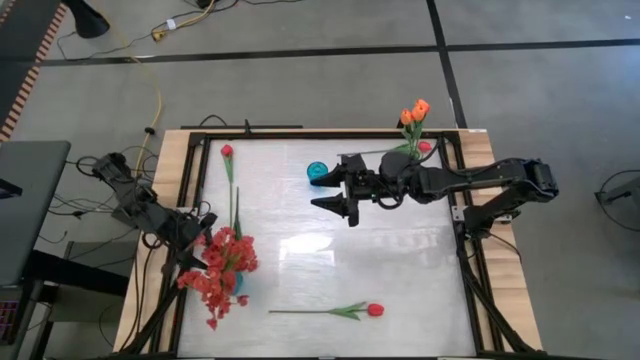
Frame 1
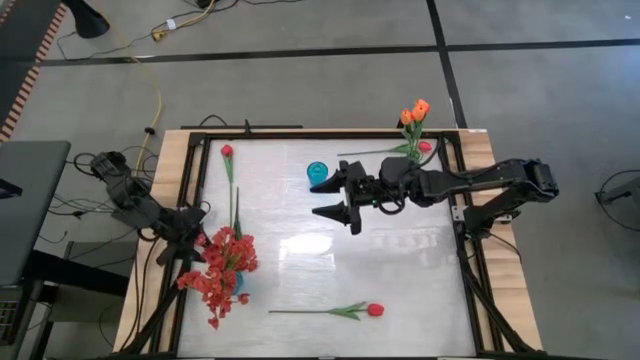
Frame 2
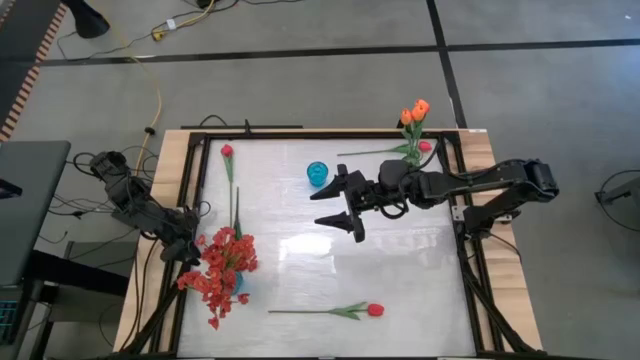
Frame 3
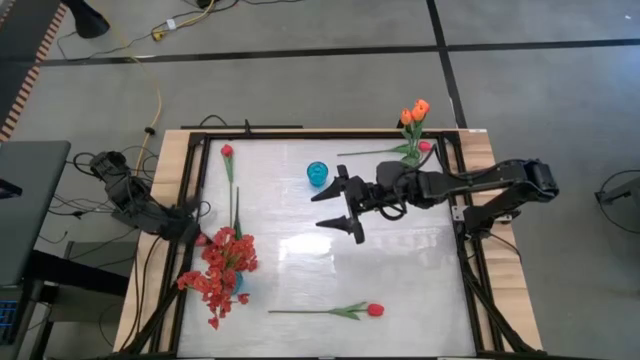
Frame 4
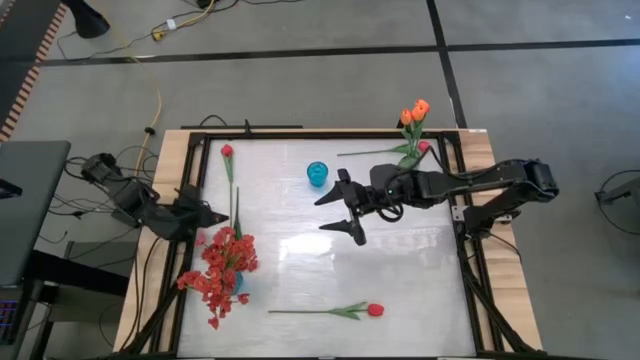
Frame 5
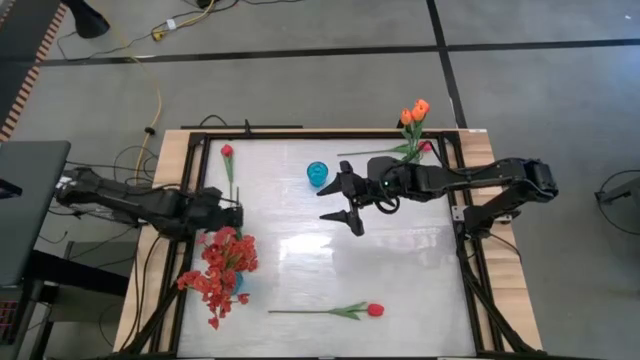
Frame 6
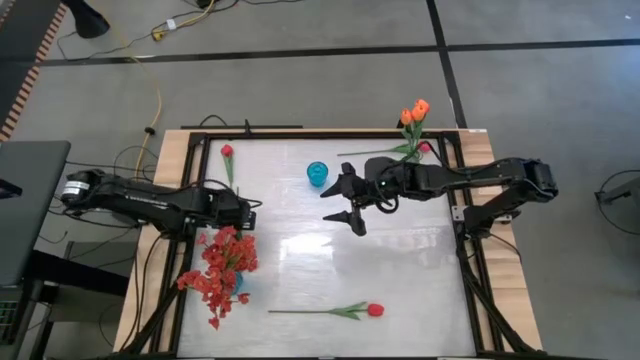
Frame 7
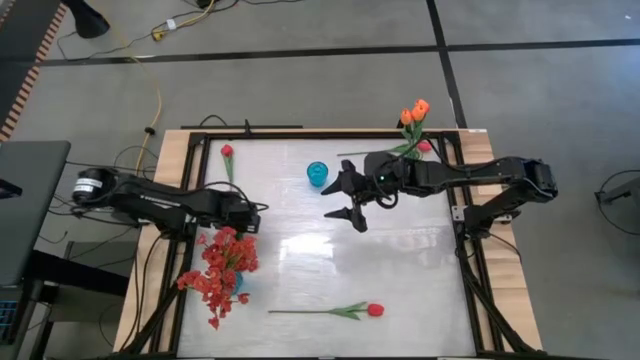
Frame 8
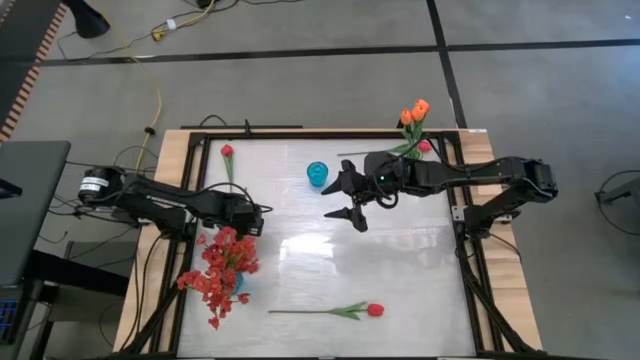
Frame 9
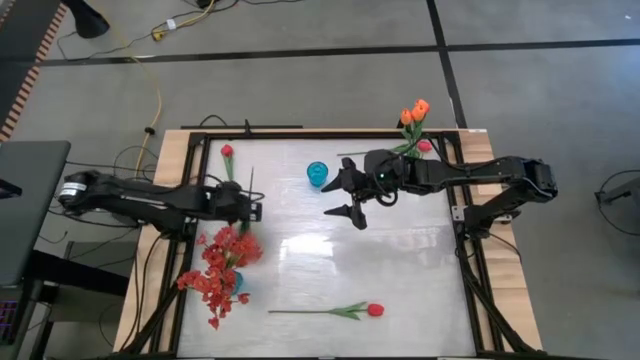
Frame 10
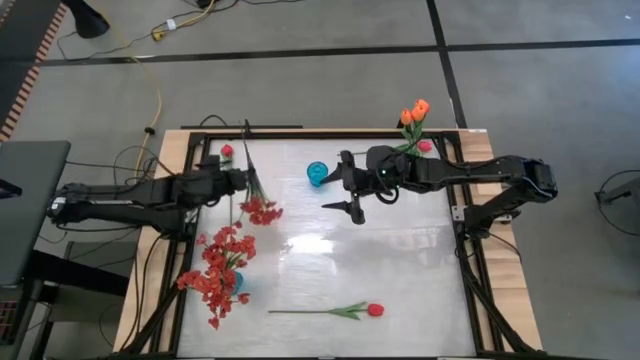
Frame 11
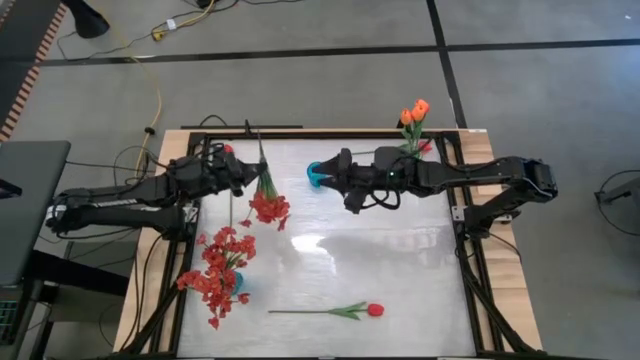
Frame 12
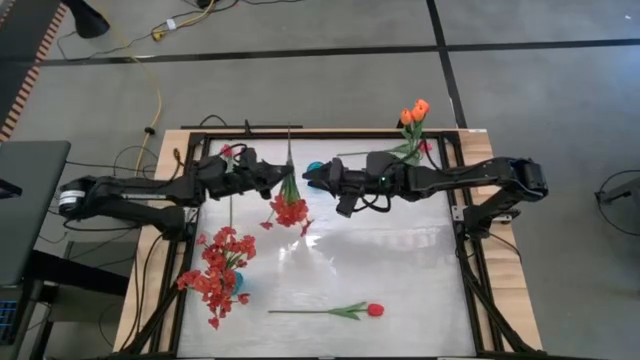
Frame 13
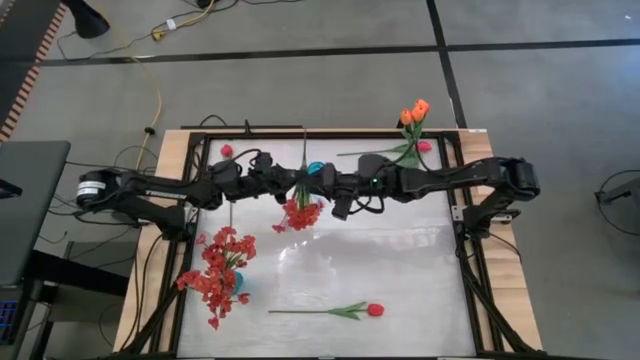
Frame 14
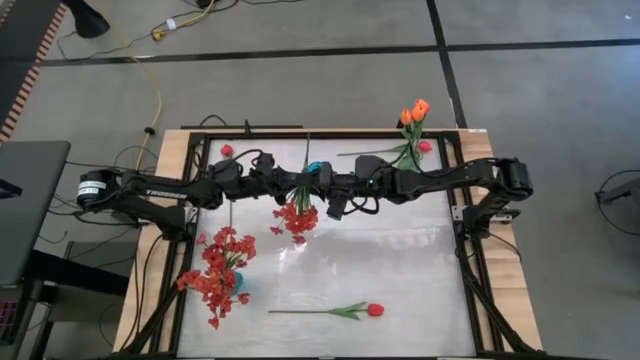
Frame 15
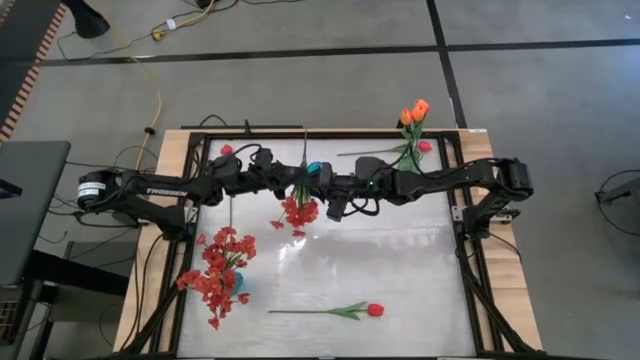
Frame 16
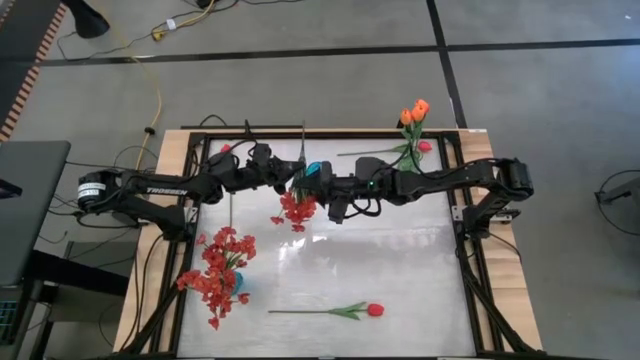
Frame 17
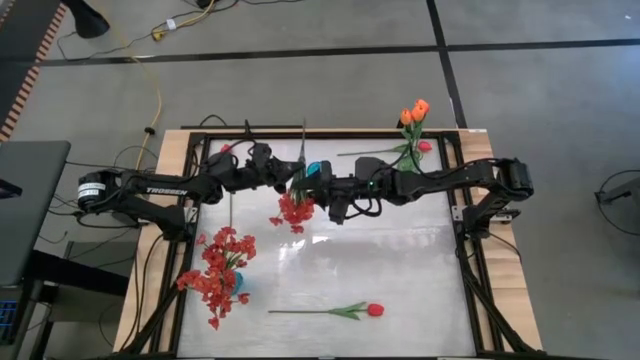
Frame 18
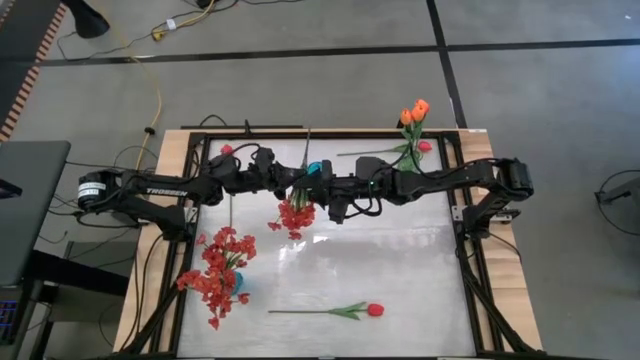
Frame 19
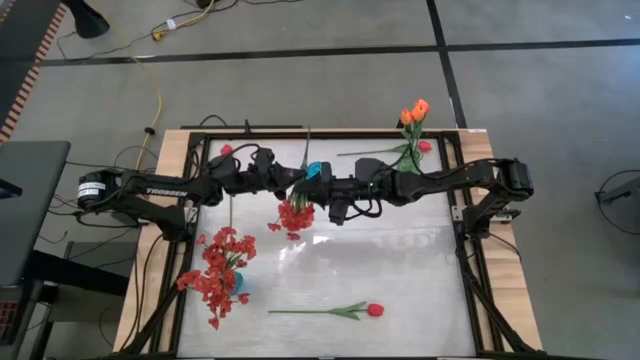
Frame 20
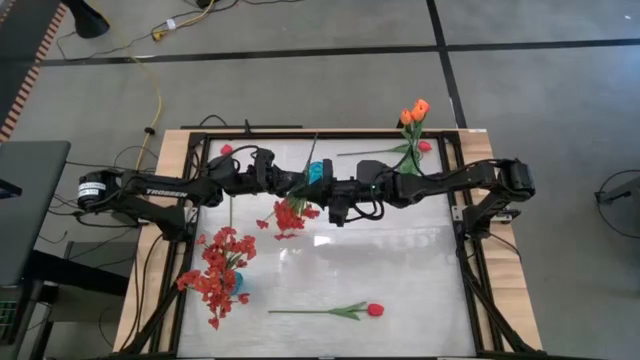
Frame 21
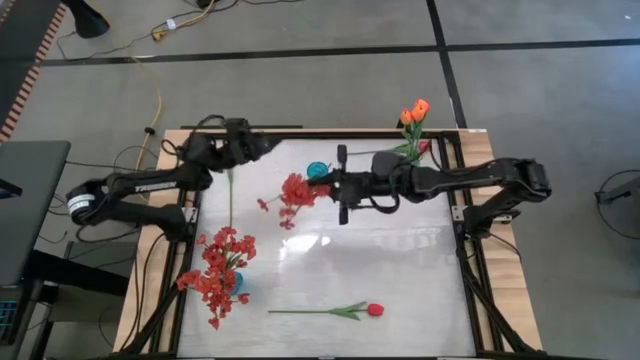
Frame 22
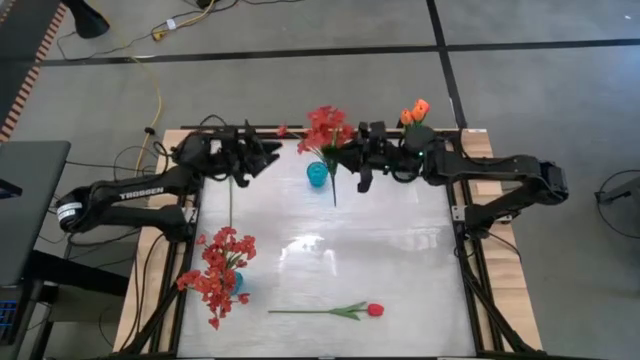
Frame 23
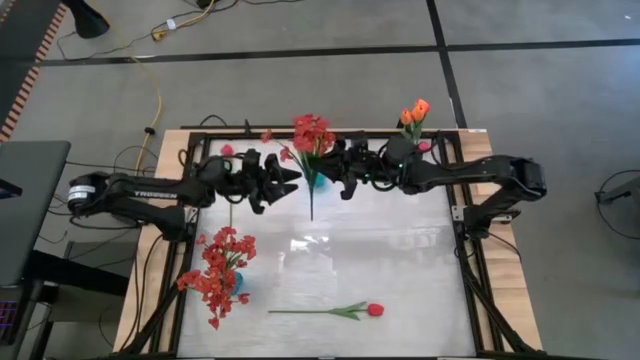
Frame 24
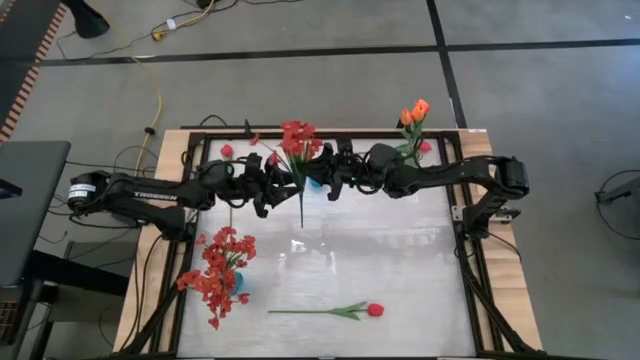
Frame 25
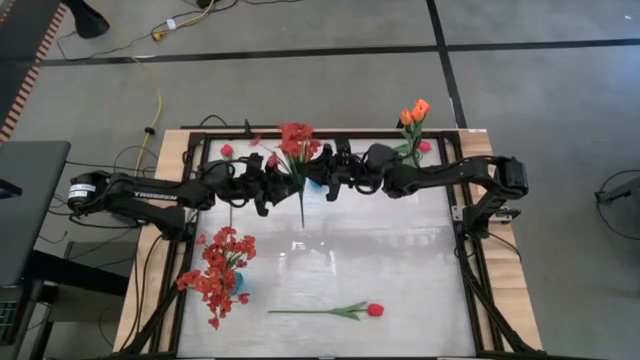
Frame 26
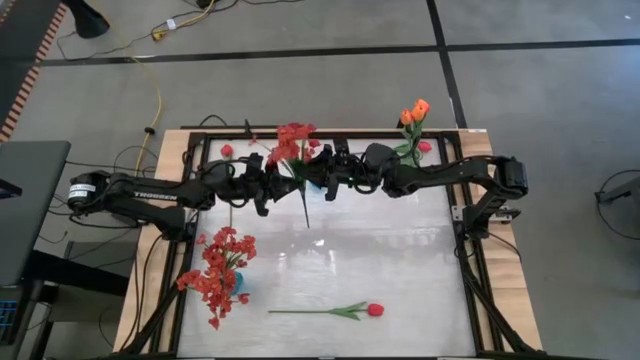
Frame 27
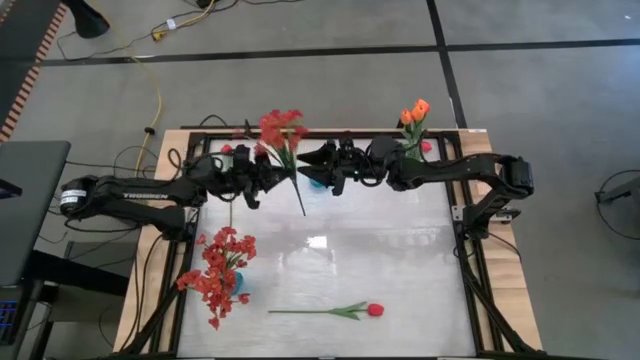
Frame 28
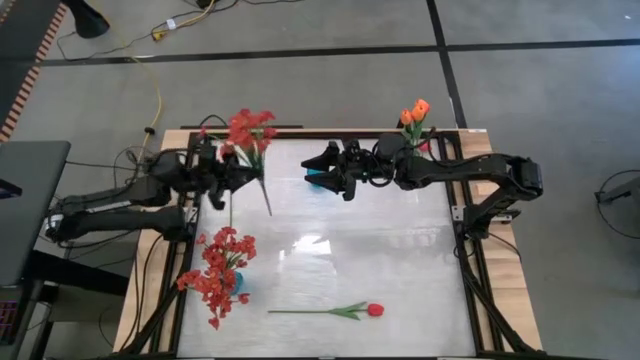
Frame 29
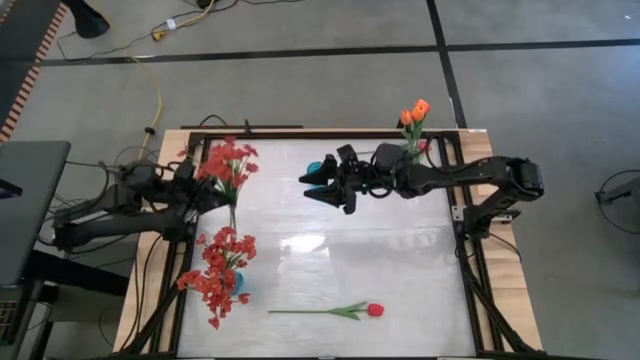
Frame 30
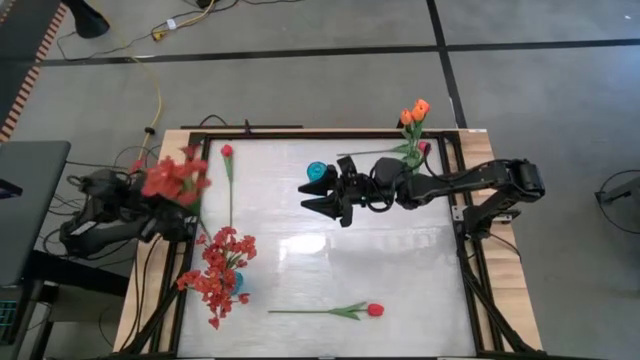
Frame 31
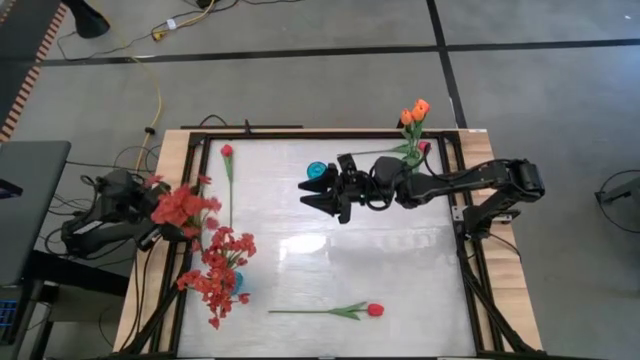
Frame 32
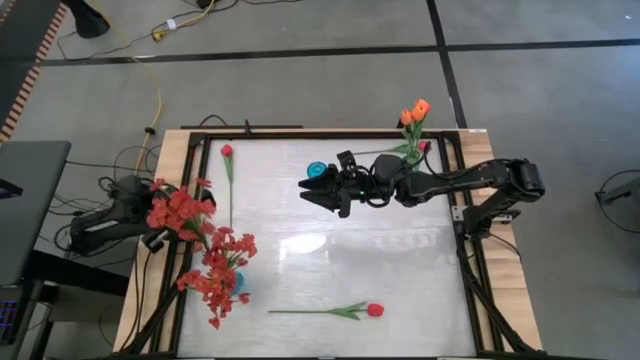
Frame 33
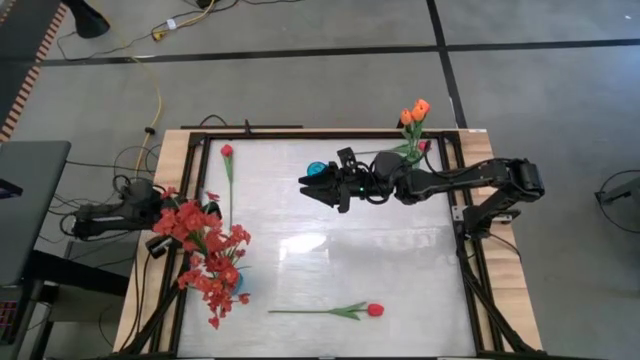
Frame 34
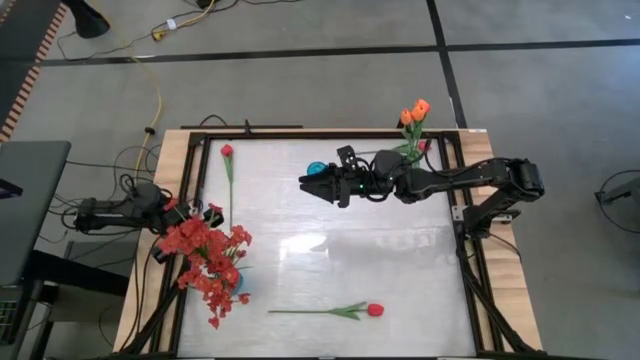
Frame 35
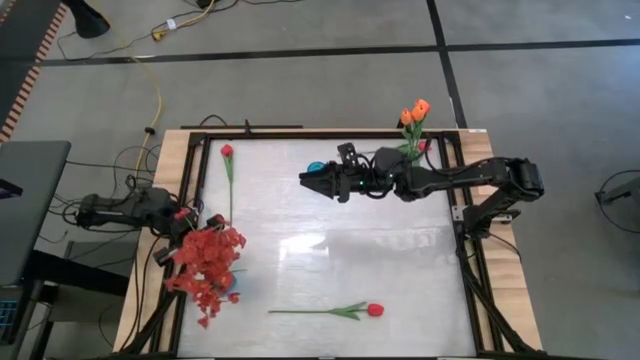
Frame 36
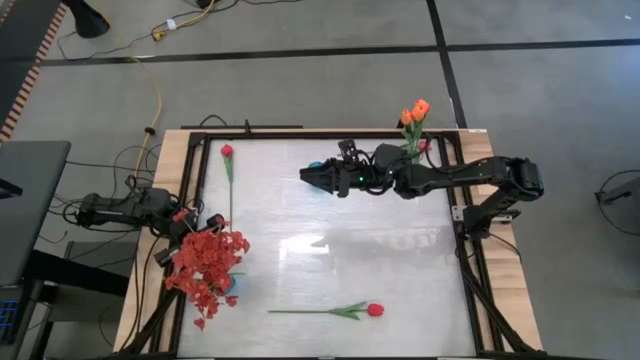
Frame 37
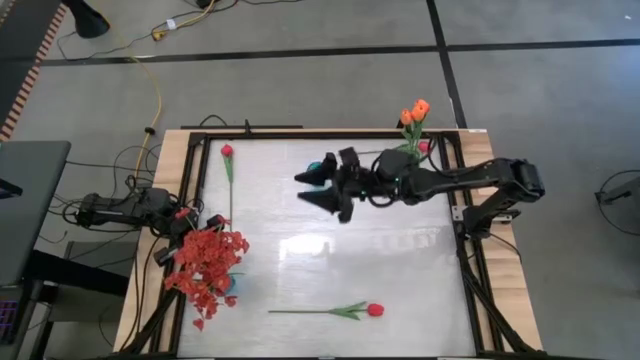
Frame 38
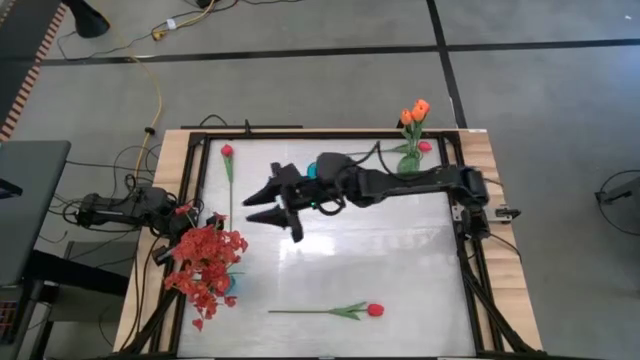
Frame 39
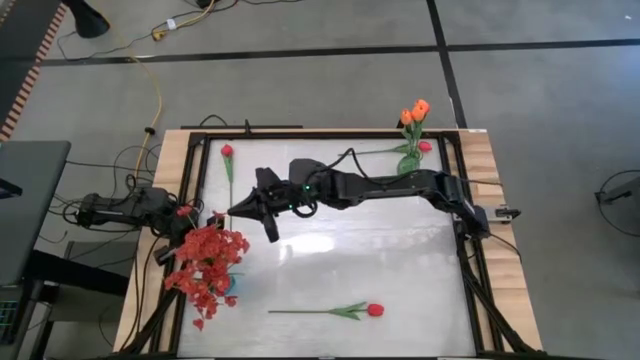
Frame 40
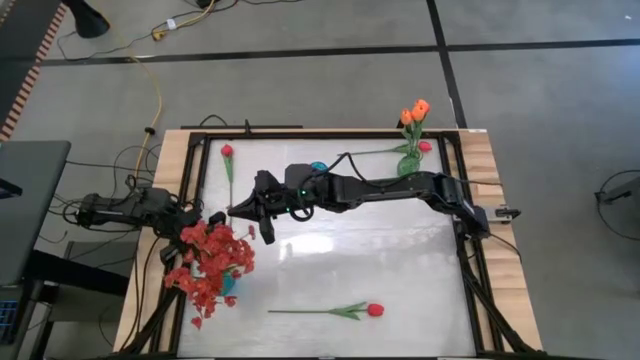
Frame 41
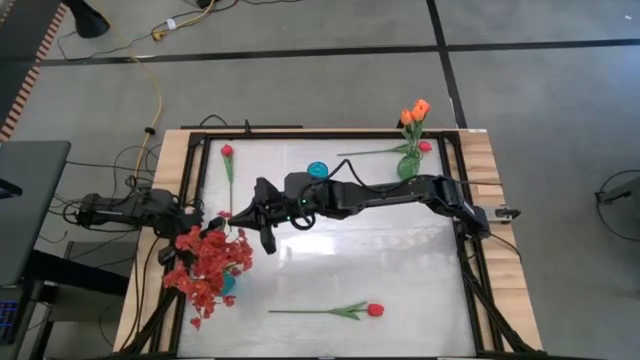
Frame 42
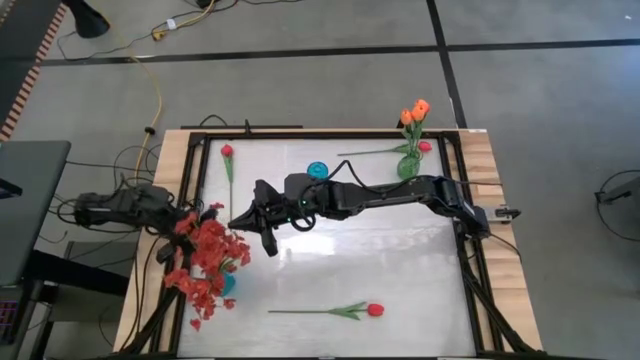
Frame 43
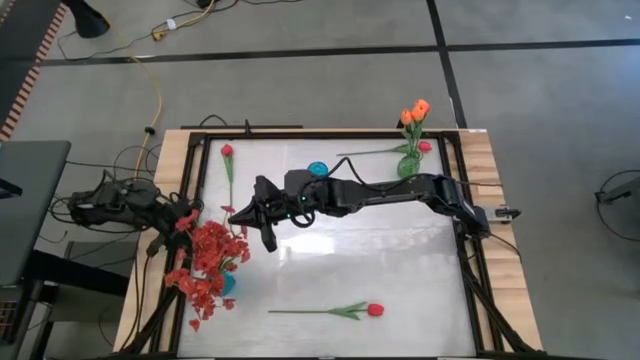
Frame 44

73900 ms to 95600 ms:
Task: Sort flowers into vase by color
Put the red flowers into the bottom blue vase
